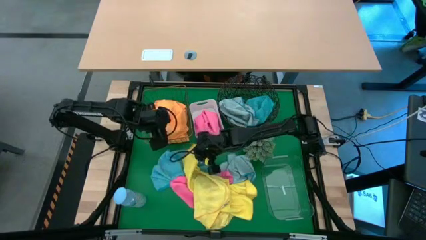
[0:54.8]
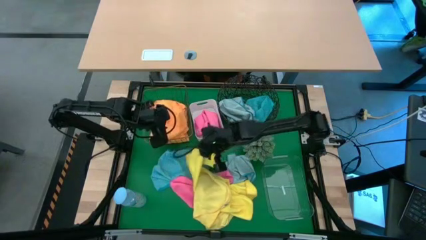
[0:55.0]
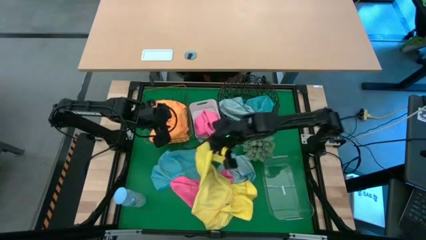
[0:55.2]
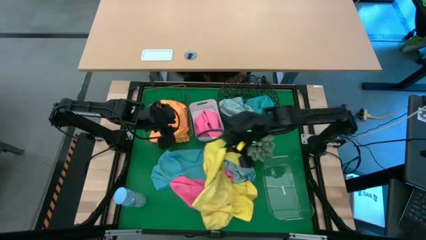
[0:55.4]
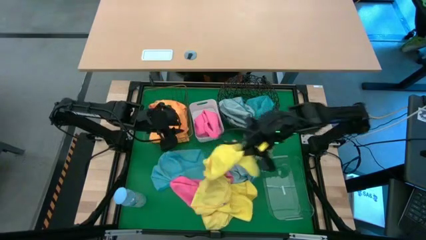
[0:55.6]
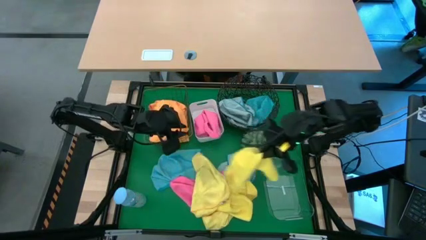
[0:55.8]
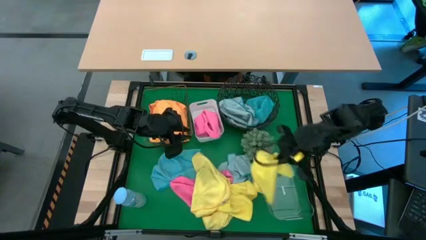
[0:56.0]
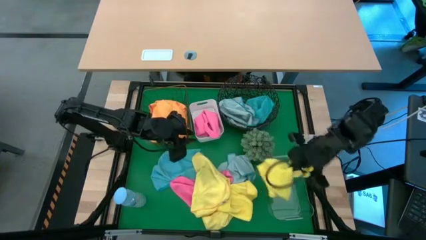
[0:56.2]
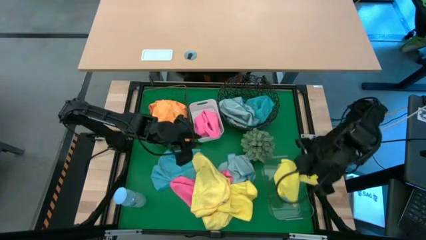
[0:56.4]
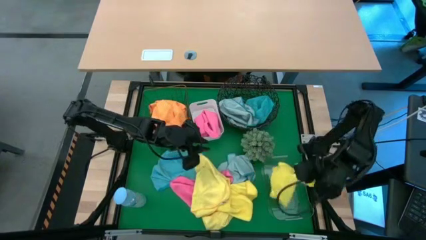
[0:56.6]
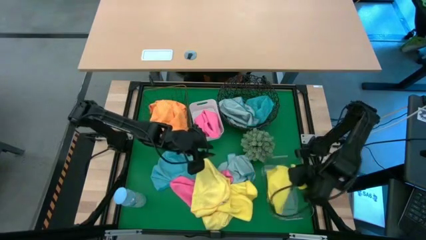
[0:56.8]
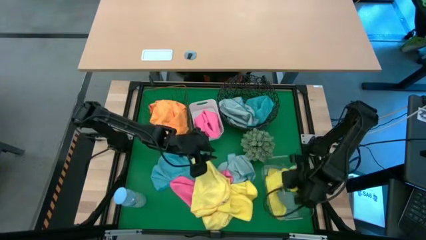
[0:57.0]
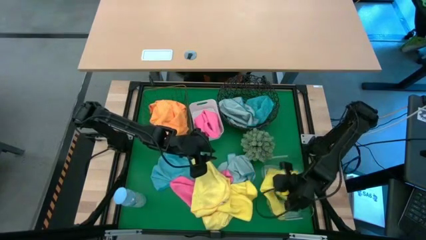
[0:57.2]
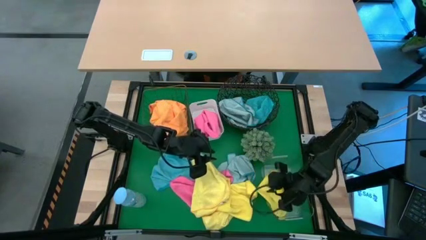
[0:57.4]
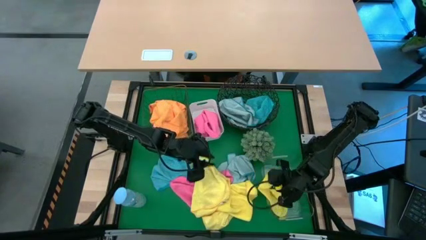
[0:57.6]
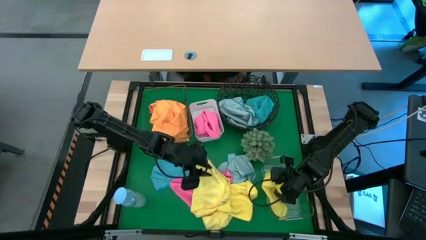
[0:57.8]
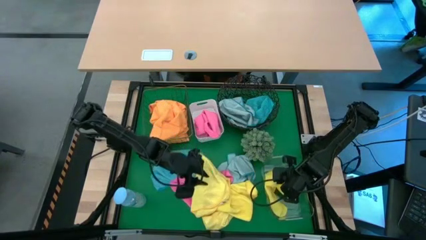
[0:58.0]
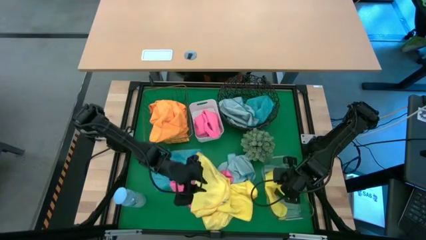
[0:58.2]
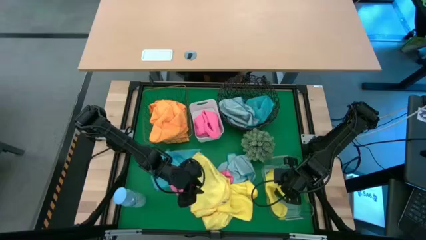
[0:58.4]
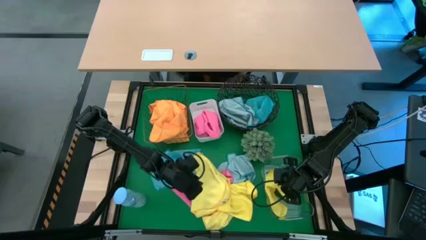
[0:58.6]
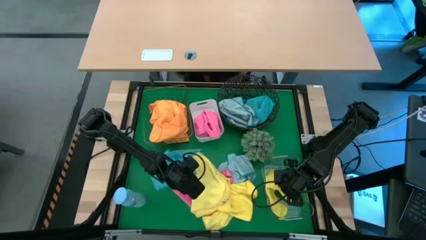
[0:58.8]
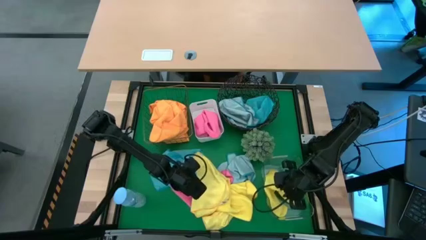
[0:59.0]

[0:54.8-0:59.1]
Task: Sort microfiber towel by color & place in baskets
Put the yellow microfiber towel into the transparent bin

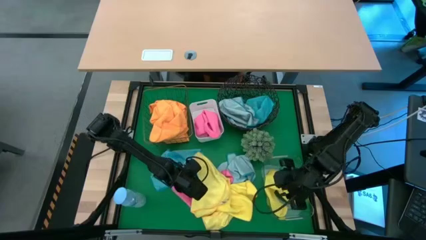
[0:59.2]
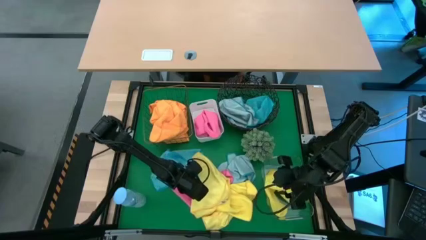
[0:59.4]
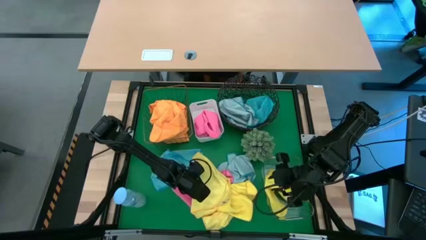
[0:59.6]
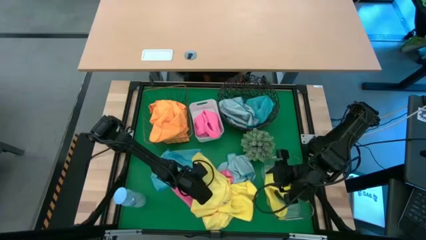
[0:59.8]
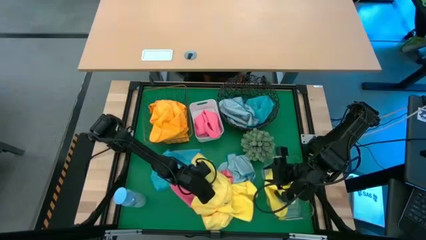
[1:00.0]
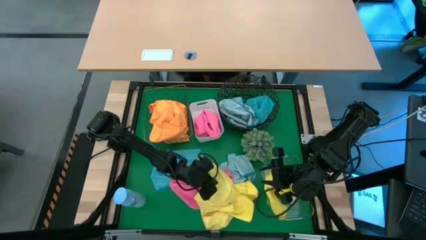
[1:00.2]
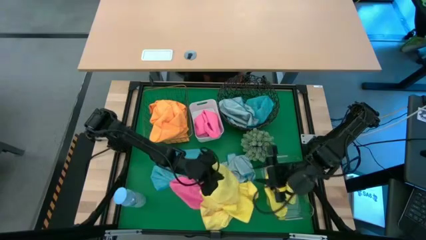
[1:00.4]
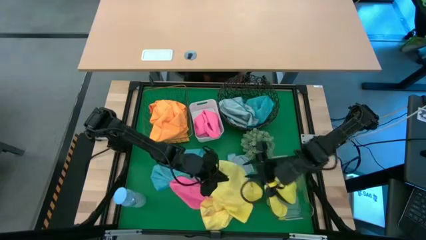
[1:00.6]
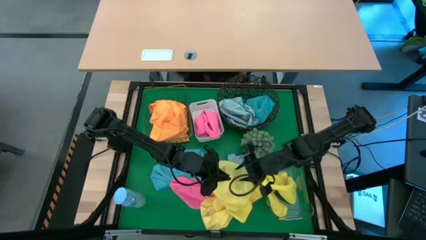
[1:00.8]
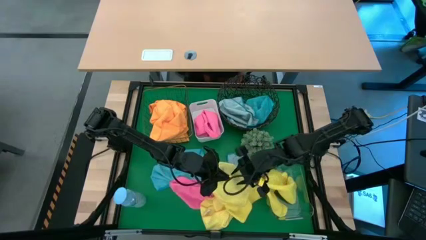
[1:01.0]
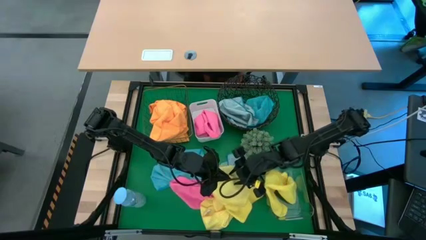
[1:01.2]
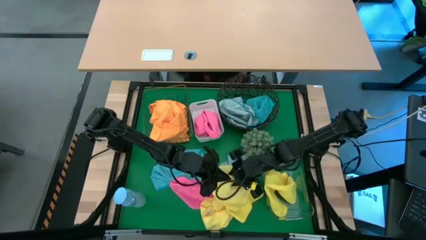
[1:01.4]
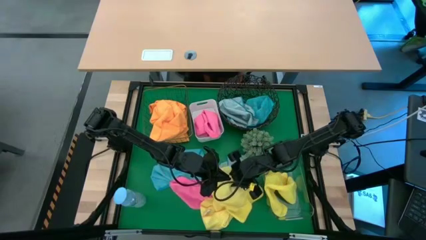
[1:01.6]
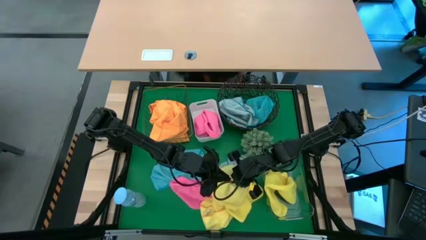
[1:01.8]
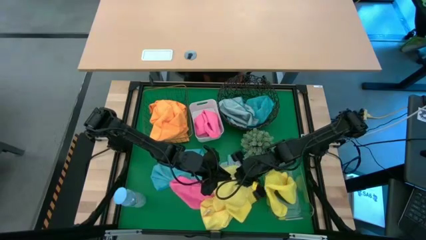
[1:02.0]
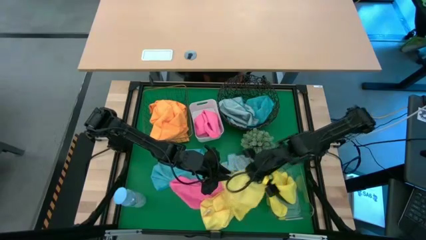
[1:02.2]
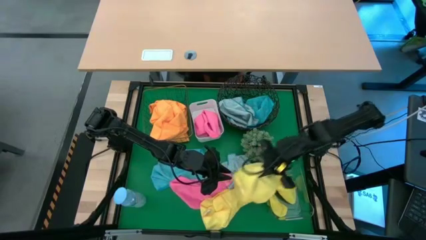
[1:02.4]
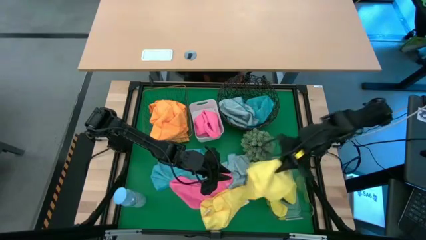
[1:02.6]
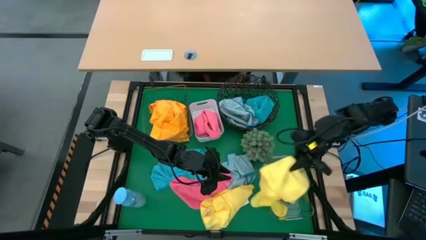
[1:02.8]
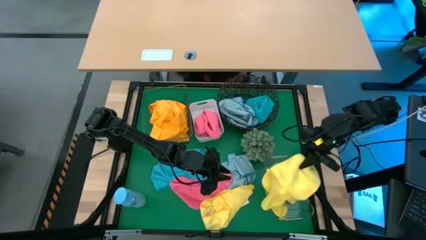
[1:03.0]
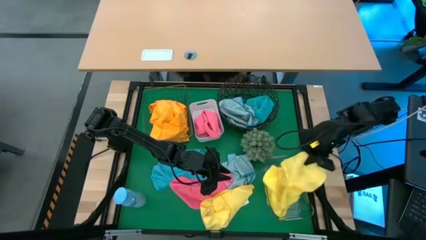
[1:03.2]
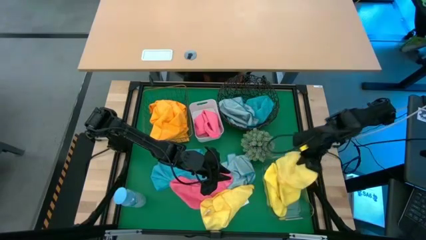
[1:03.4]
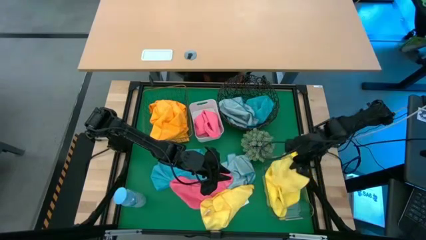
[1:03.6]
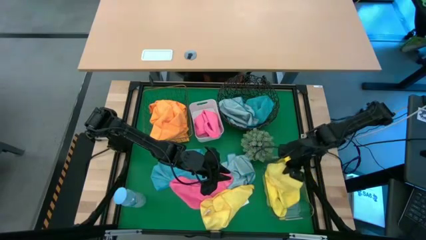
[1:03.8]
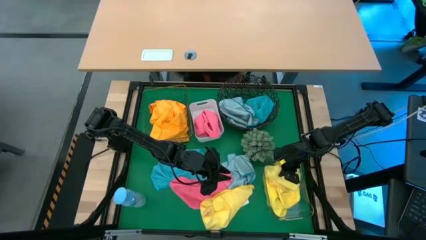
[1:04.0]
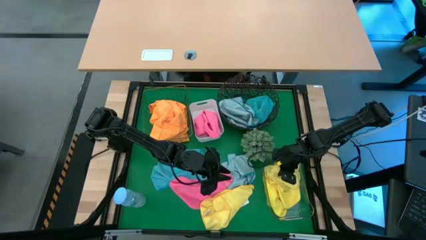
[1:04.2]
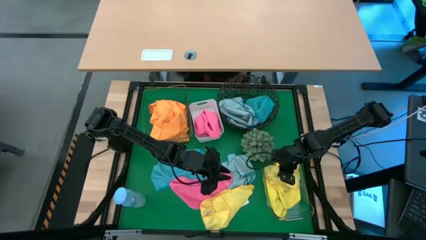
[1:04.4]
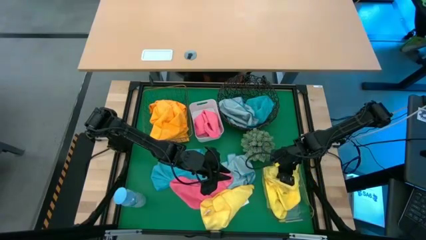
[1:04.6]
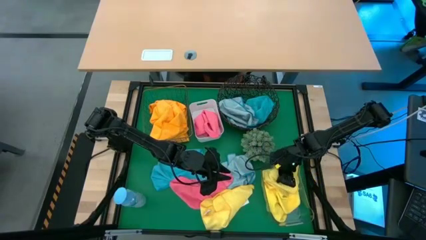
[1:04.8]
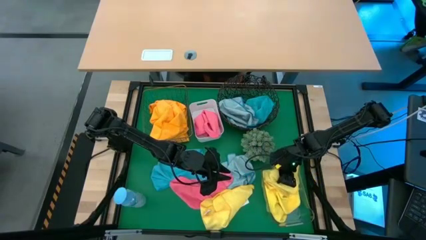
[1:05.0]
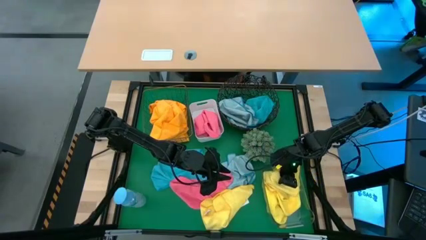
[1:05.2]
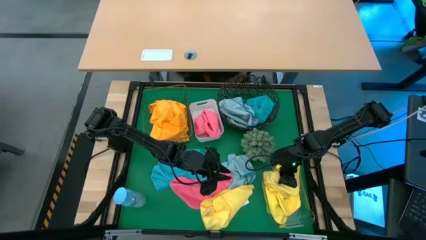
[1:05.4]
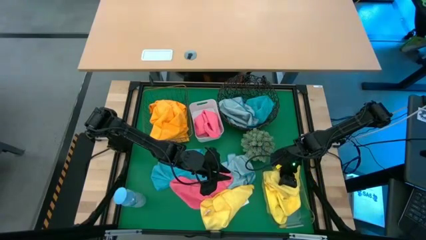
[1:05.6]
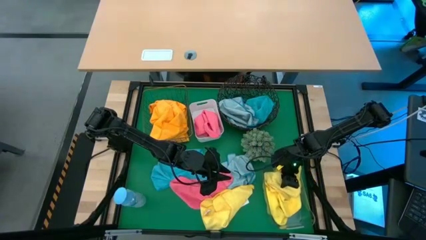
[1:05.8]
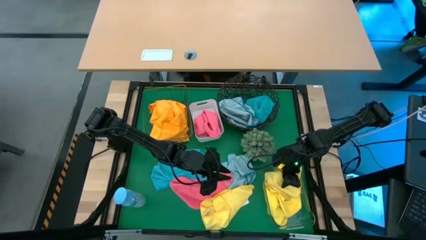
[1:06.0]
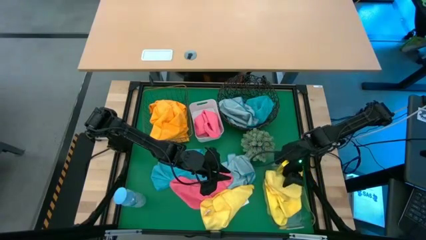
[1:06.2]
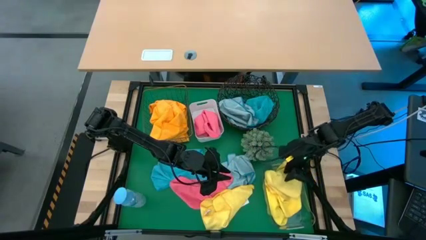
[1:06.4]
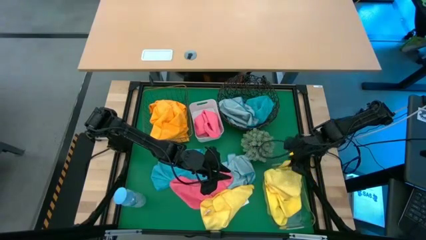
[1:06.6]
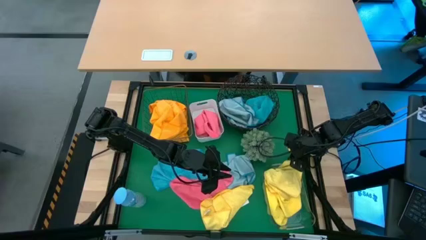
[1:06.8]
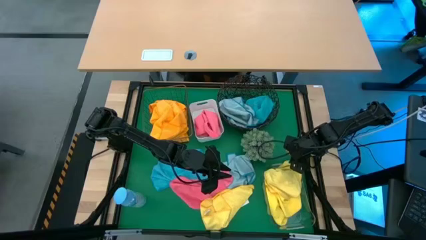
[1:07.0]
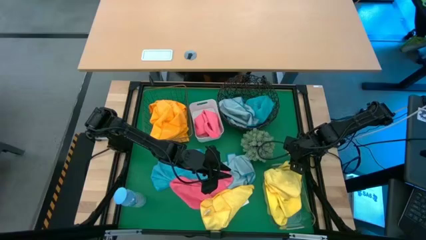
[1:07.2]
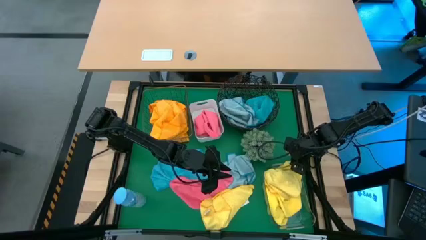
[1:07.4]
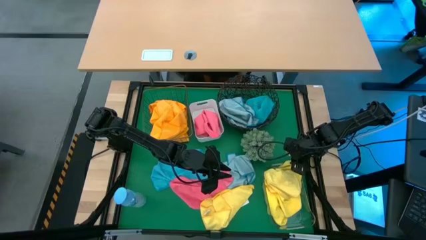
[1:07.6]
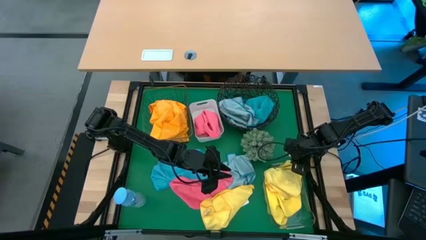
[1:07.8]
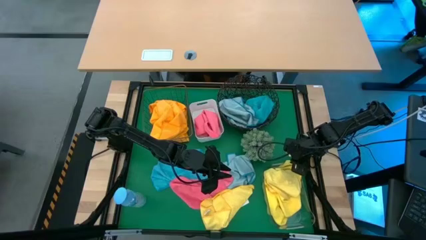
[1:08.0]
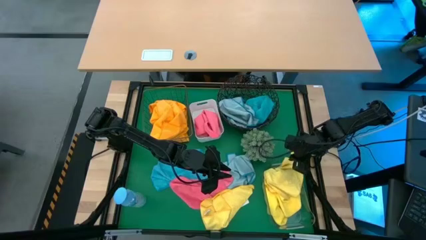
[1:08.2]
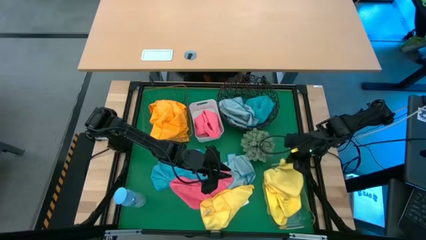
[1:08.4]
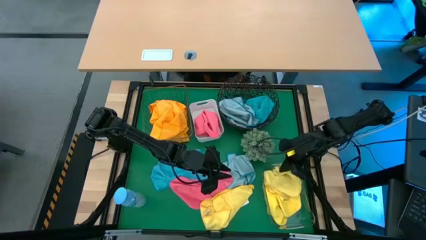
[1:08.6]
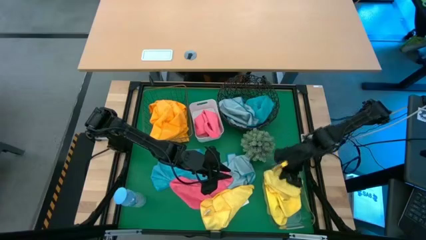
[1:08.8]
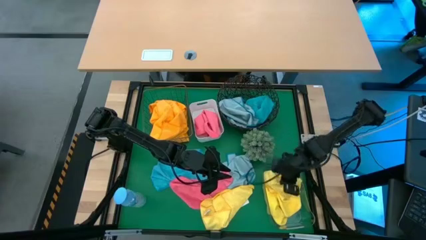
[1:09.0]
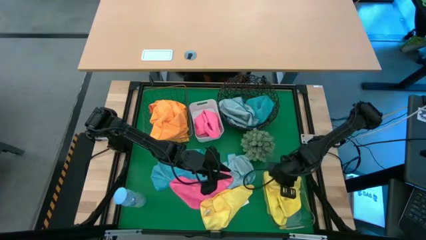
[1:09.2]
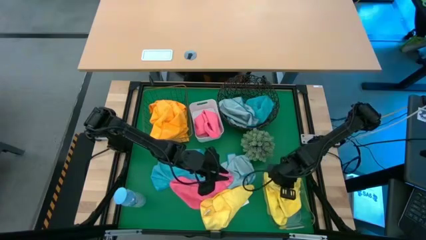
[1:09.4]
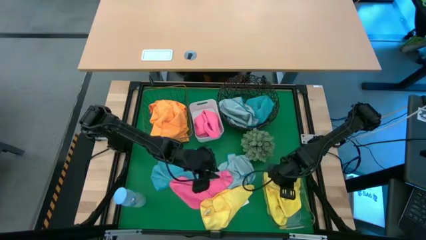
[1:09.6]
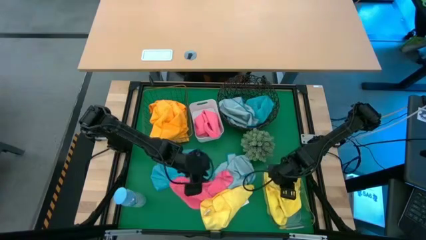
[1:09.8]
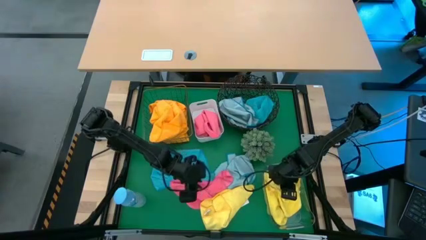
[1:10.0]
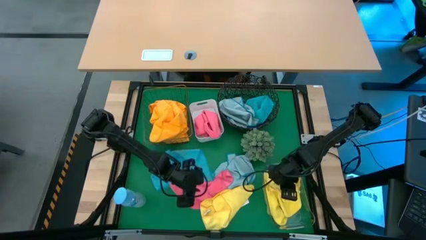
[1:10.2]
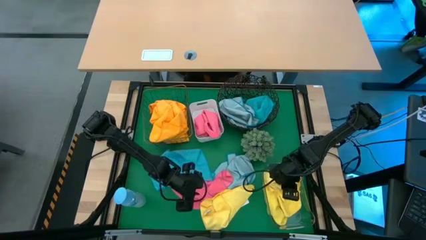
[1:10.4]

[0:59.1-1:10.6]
Put the yellow microfiber towel into the transparent bin
